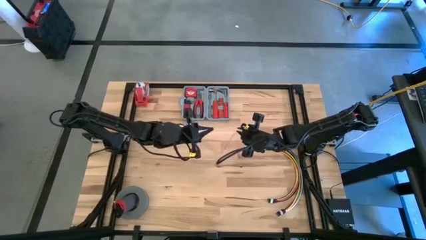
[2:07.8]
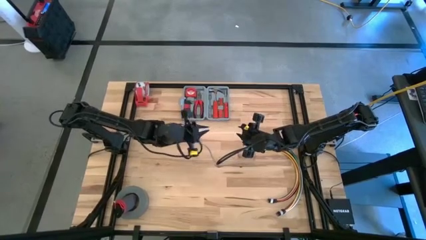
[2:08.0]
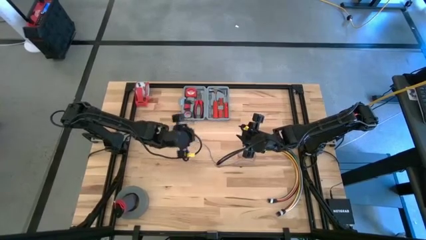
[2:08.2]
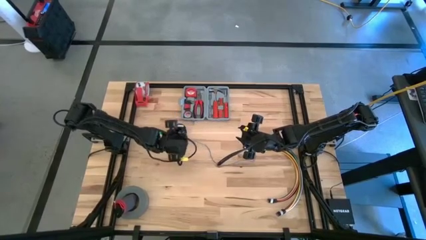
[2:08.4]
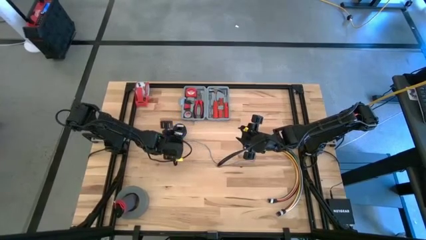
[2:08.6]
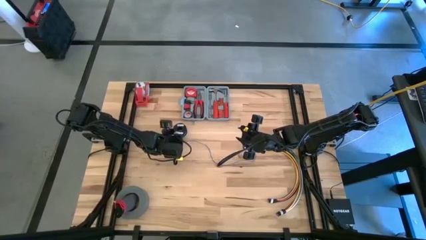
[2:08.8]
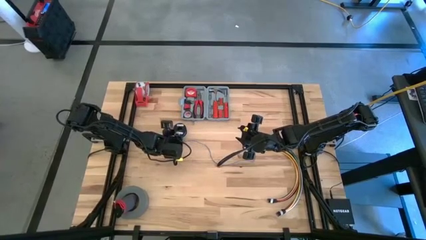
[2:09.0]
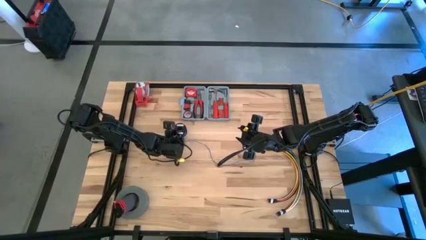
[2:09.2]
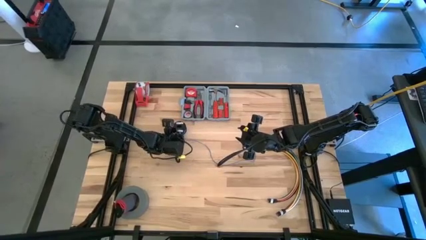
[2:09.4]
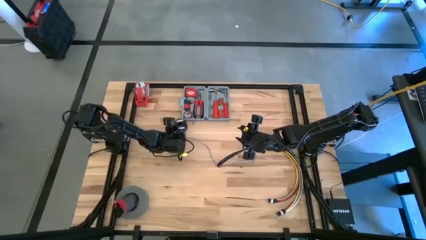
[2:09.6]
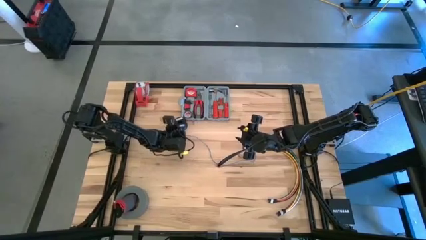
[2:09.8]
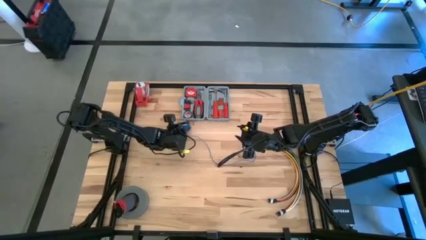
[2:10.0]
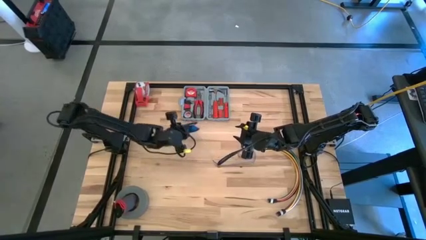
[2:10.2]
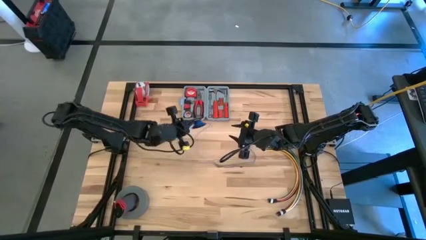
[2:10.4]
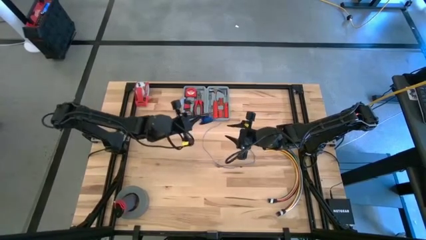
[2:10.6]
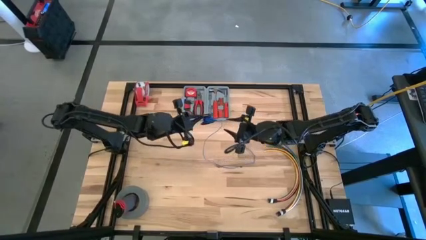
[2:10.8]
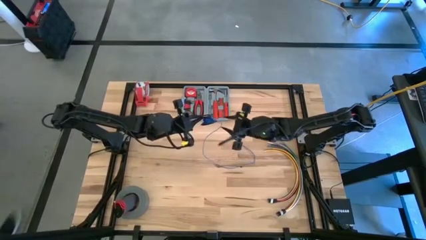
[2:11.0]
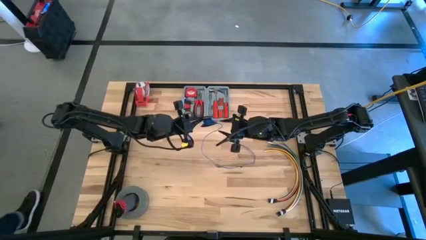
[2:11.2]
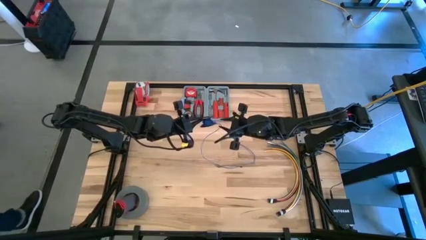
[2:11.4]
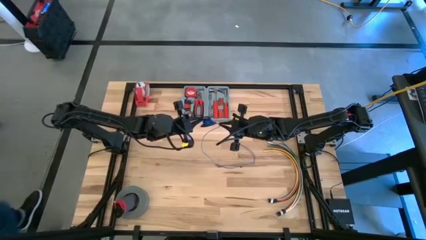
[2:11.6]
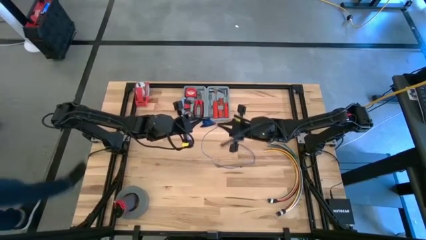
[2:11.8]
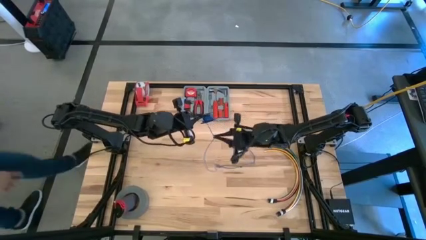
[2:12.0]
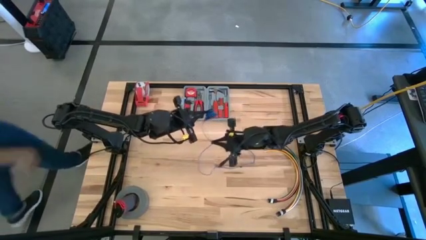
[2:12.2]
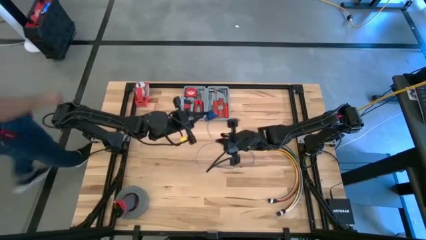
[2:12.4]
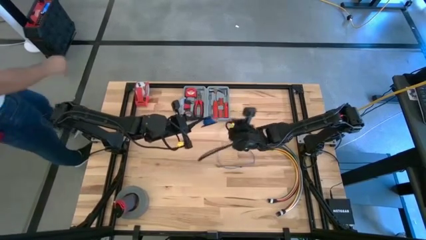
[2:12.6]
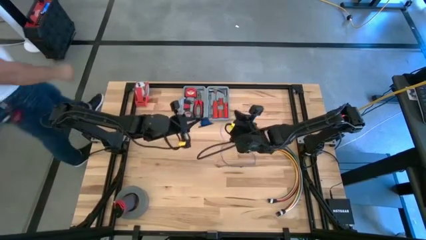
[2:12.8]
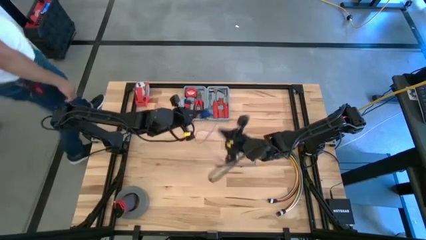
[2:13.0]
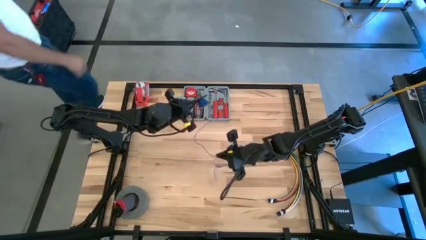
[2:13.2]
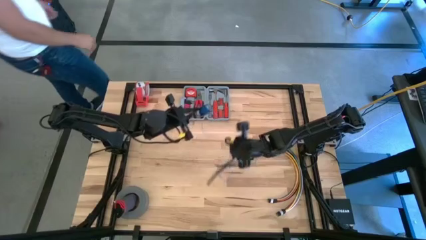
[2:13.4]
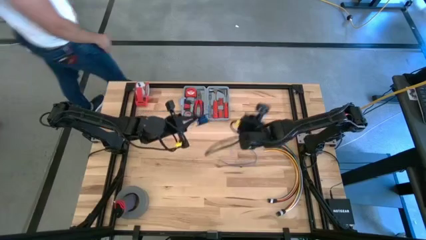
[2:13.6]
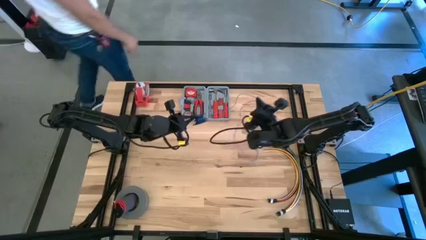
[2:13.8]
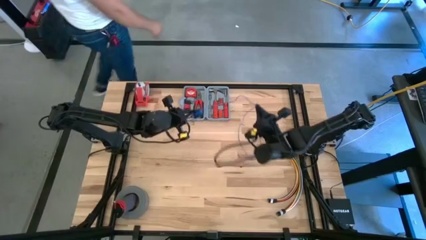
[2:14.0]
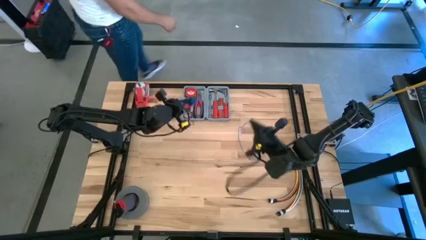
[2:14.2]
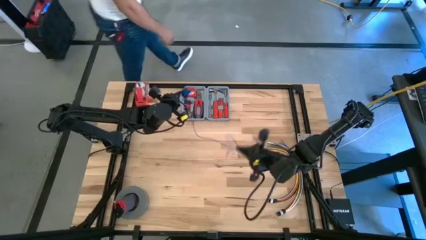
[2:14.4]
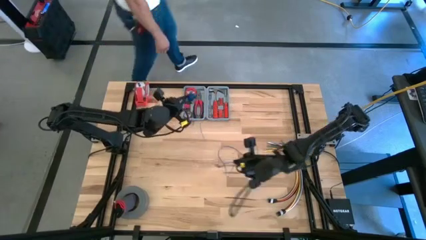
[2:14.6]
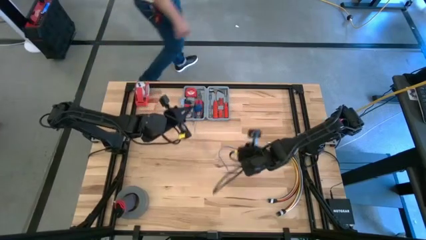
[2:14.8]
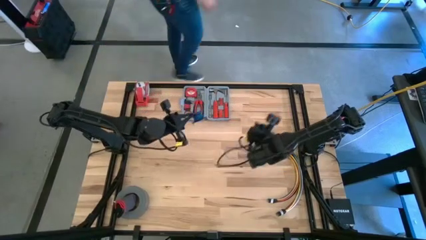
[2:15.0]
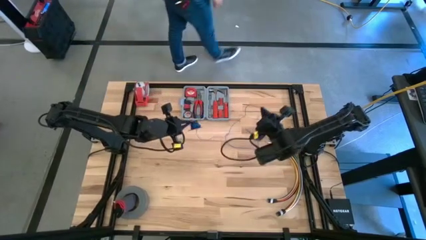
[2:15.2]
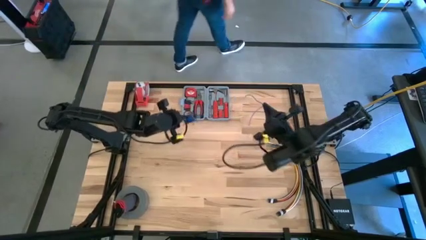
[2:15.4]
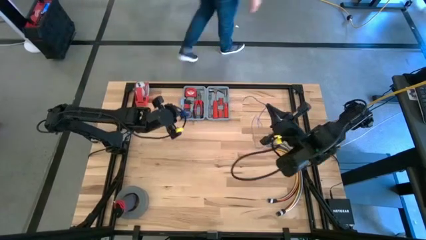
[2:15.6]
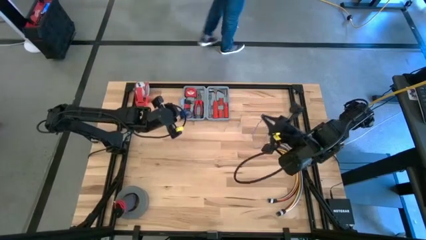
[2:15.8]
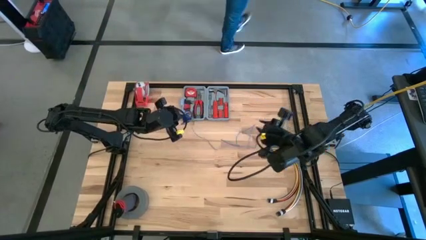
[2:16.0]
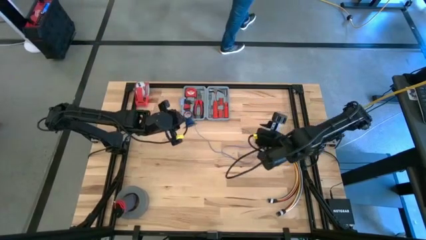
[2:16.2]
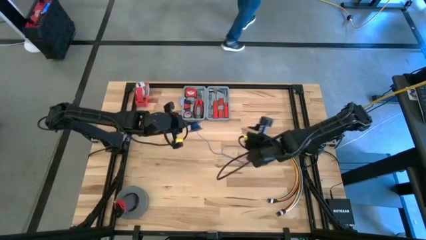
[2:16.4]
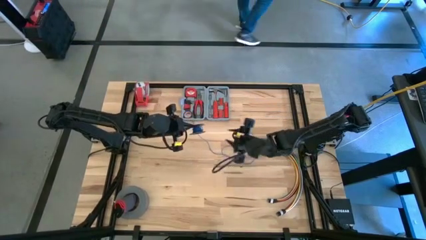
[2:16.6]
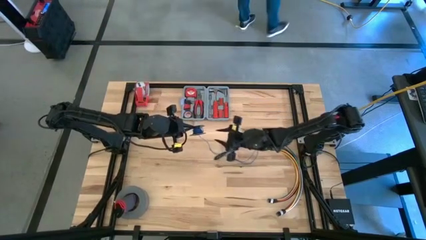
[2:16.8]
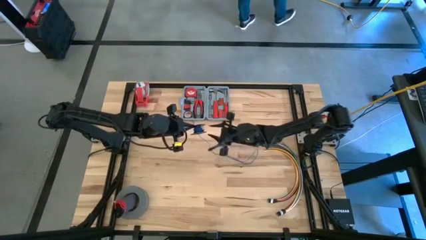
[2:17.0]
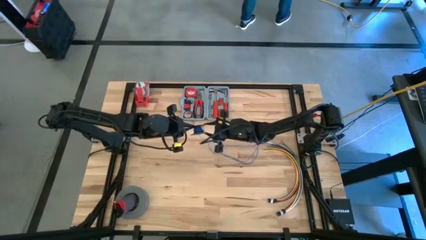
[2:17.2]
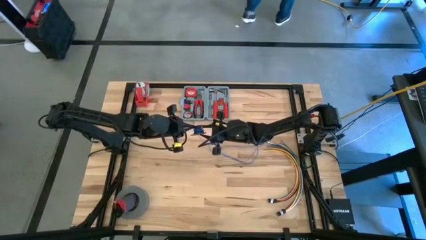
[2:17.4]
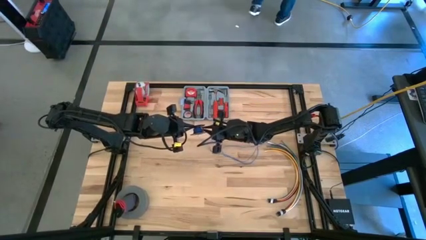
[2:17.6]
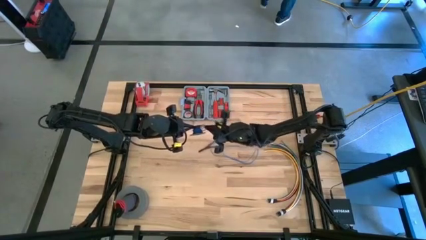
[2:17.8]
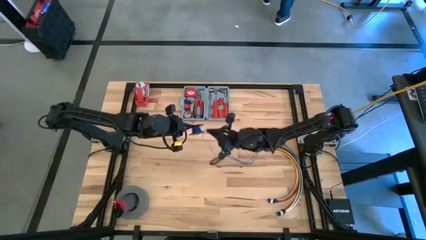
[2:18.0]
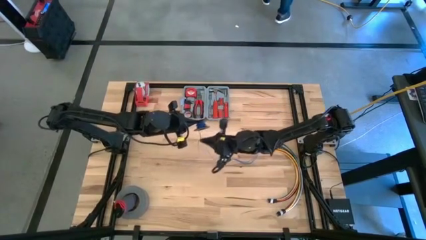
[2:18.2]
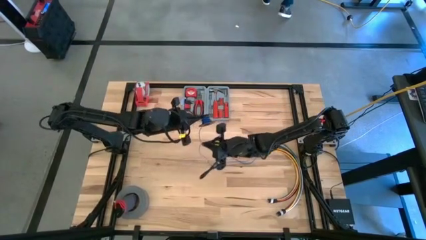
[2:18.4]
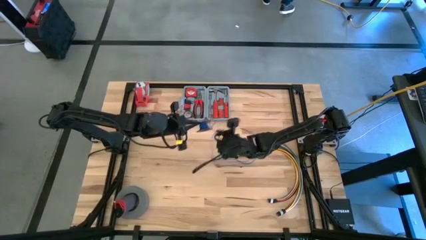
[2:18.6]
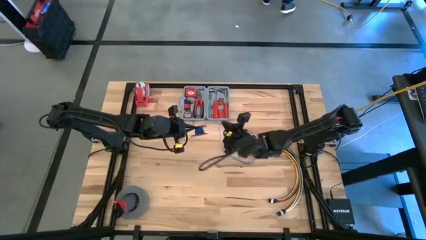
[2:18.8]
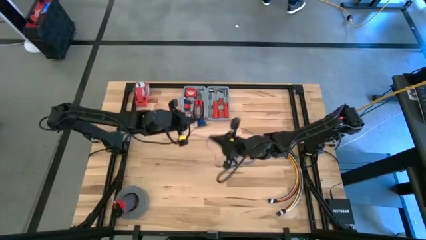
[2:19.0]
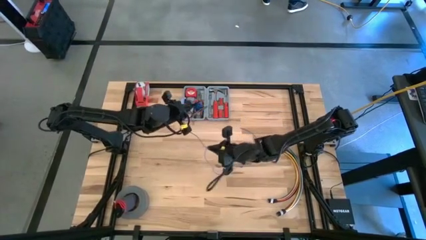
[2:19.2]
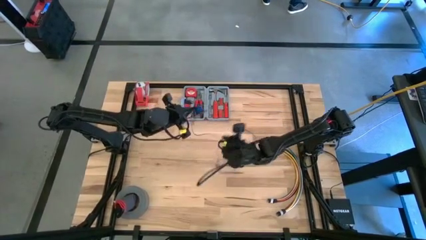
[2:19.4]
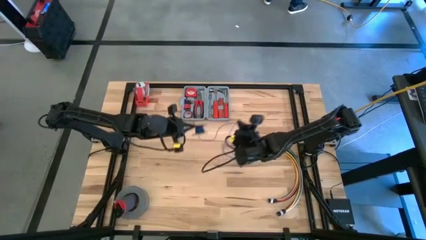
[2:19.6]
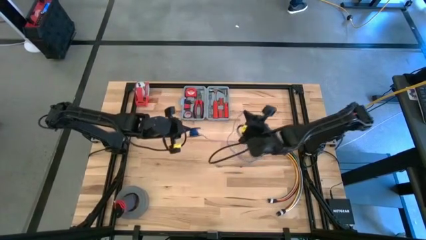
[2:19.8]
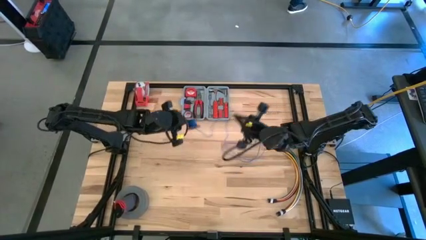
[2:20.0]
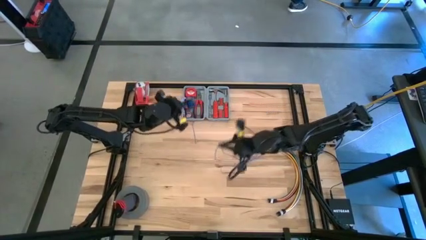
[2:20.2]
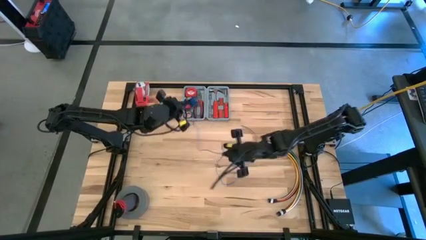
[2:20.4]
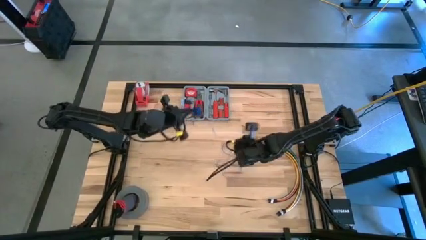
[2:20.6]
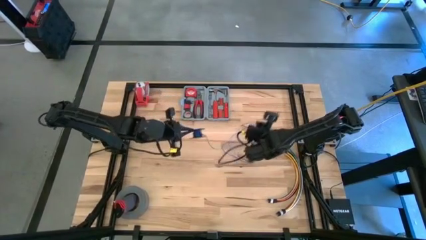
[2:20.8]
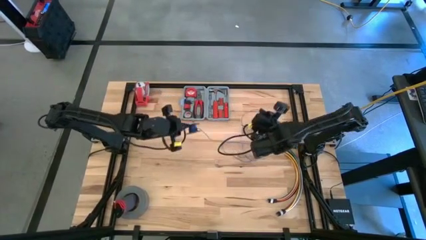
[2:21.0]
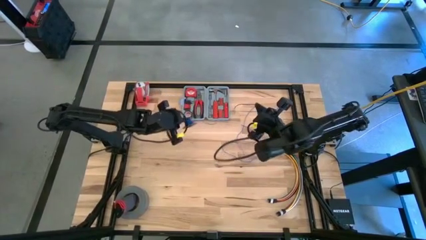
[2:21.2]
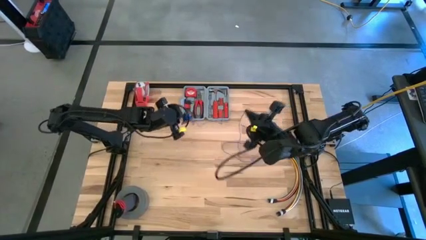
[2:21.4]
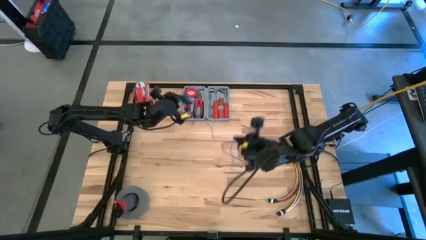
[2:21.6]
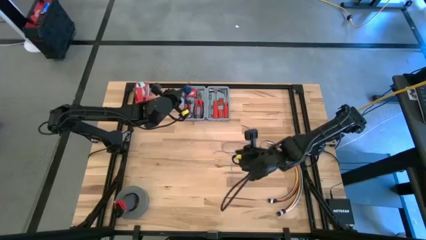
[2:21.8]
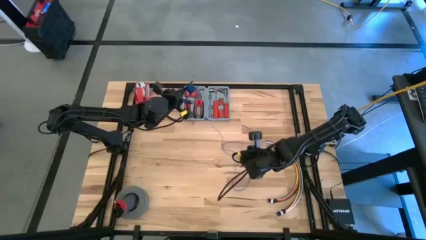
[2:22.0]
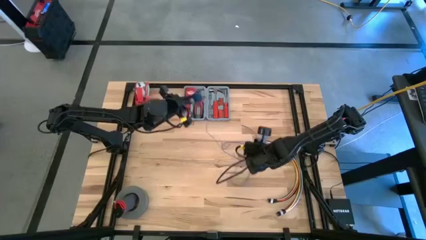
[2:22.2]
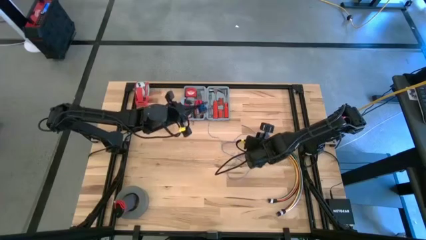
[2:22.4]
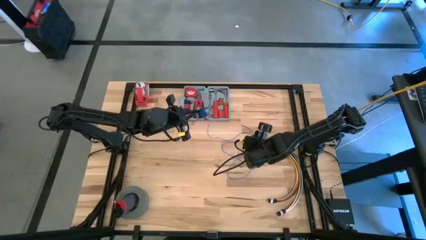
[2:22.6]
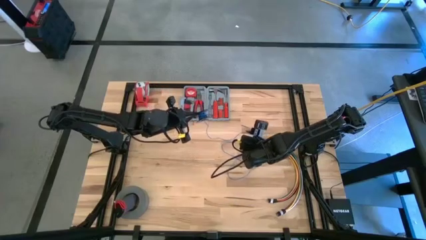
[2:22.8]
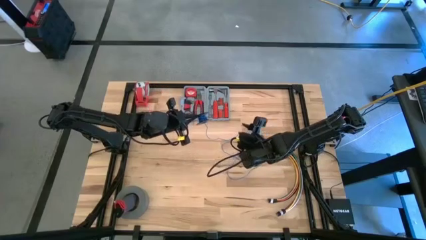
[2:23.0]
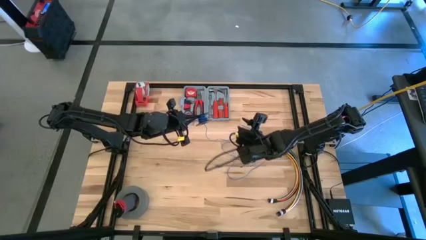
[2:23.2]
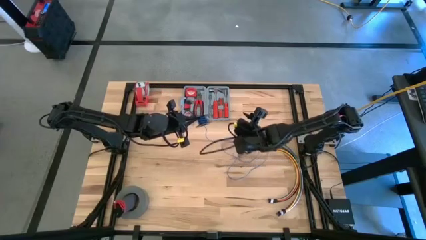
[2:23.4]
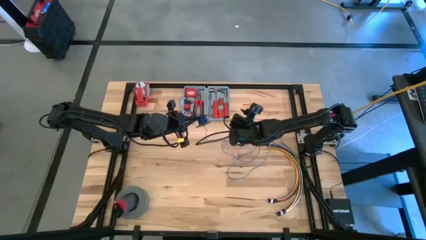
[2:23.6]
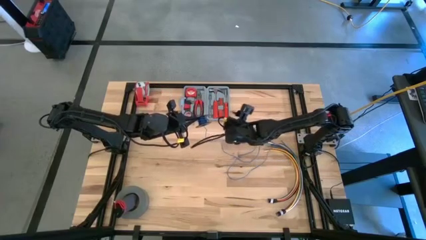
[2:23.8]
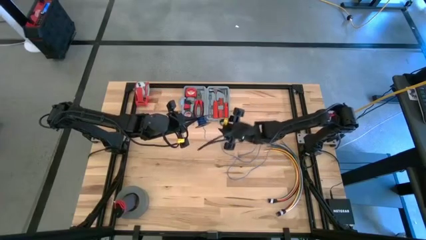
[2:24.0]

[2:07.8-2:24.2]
Task: Coil cords
Uncoil the blue wire from the spool
